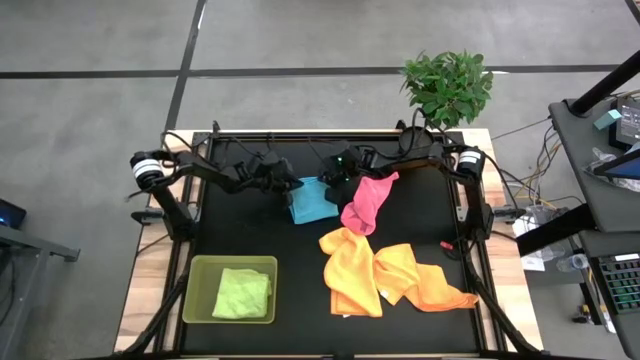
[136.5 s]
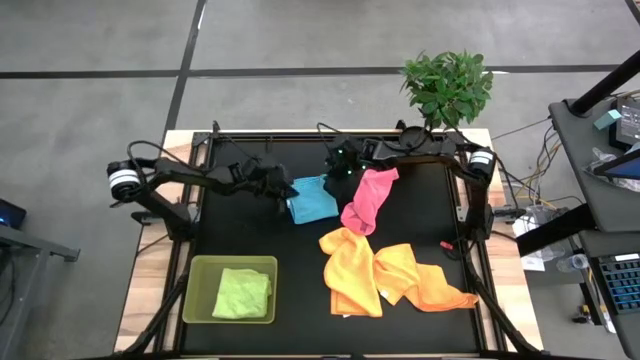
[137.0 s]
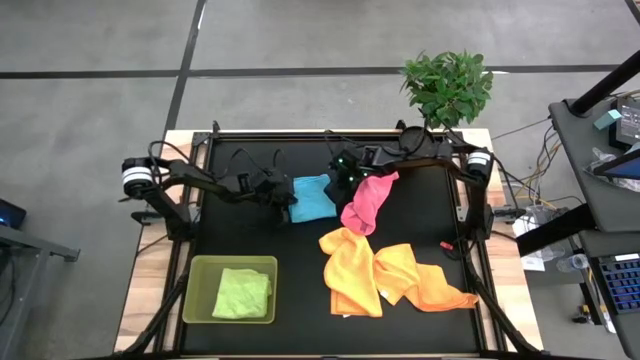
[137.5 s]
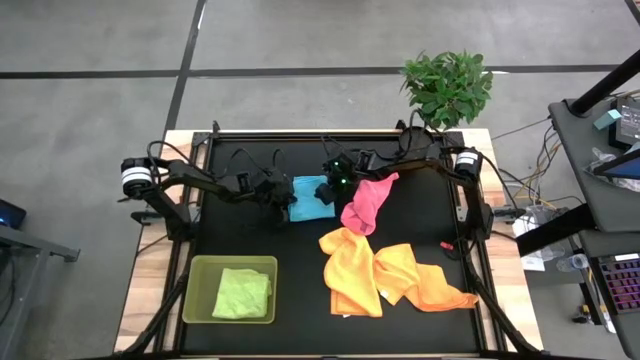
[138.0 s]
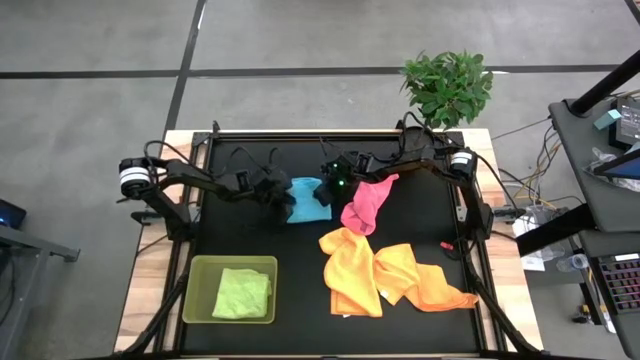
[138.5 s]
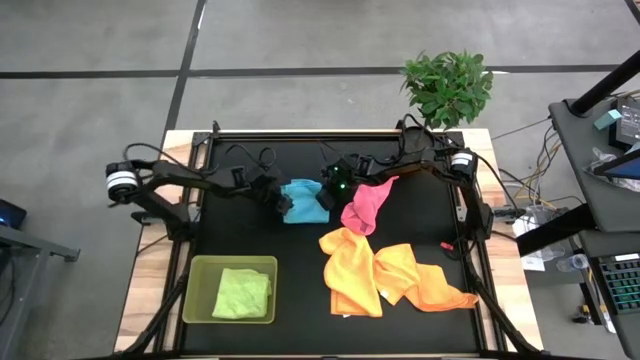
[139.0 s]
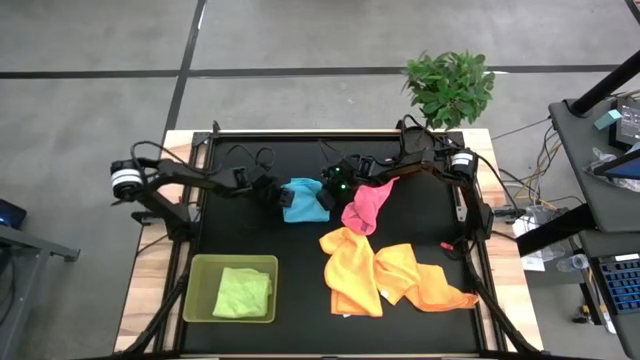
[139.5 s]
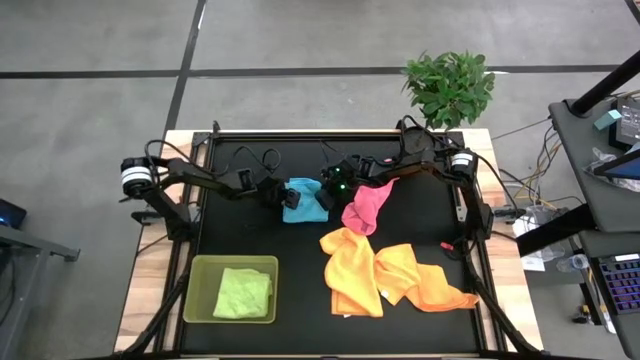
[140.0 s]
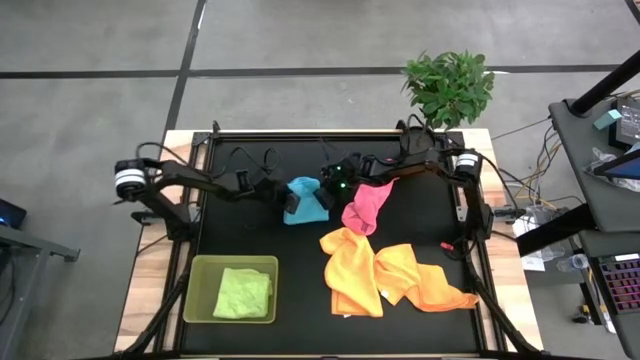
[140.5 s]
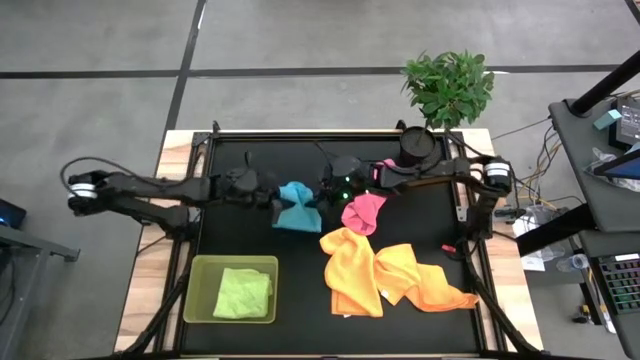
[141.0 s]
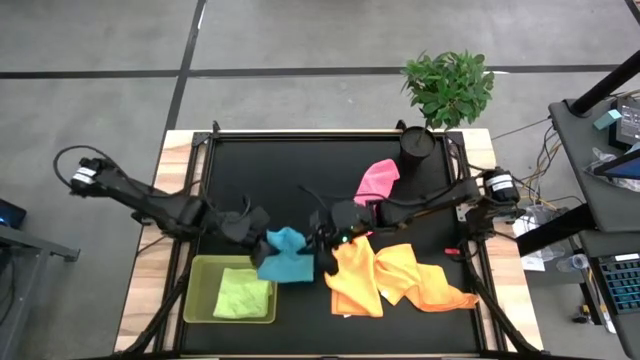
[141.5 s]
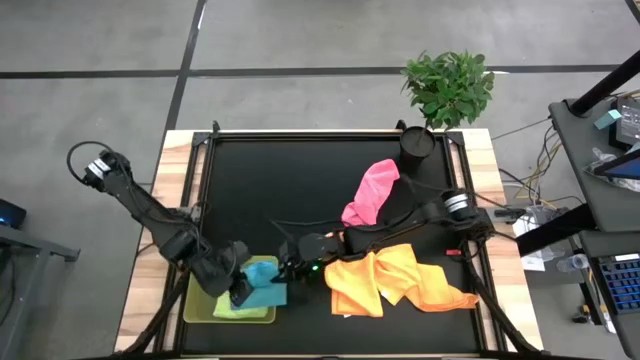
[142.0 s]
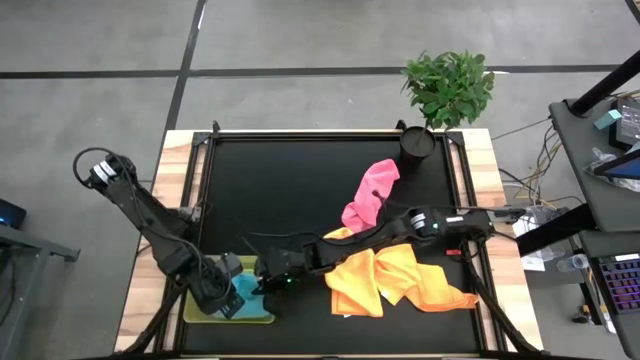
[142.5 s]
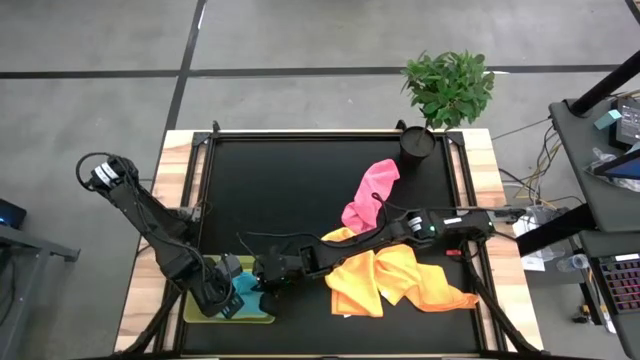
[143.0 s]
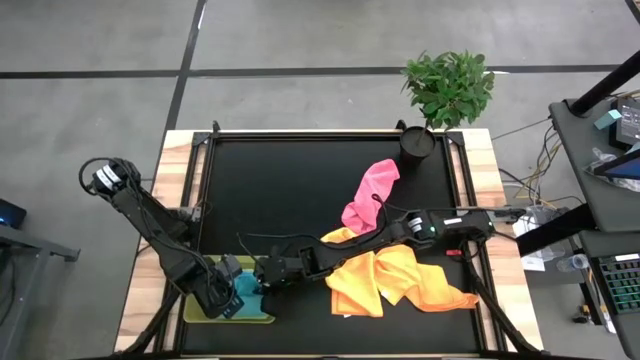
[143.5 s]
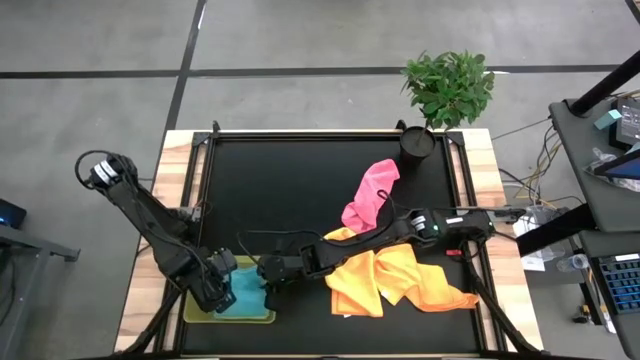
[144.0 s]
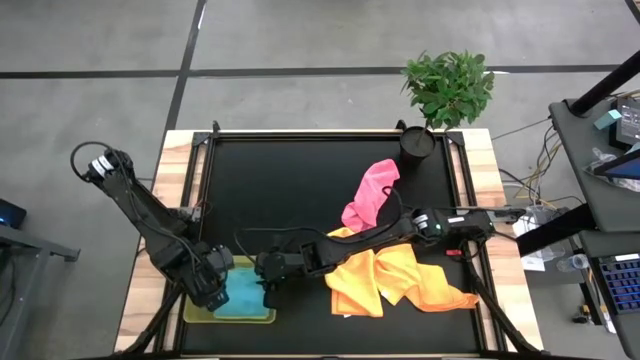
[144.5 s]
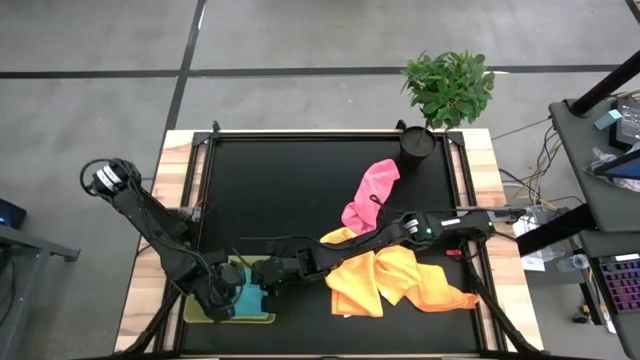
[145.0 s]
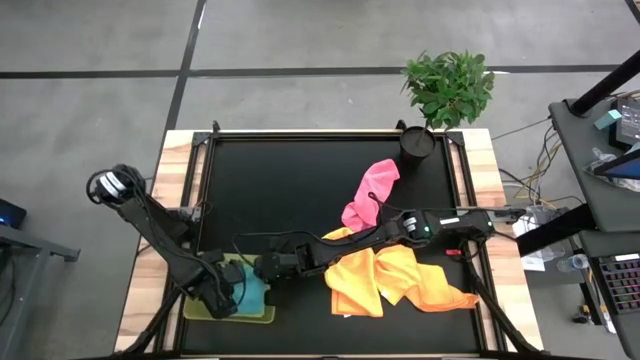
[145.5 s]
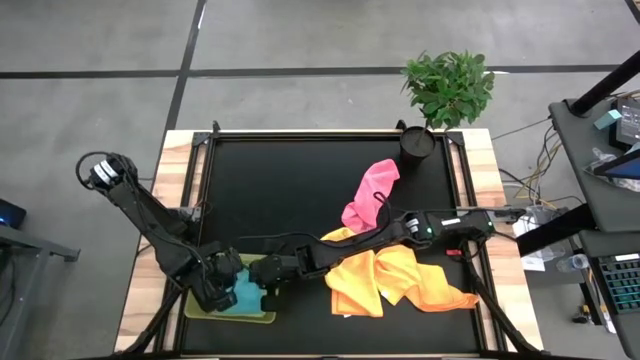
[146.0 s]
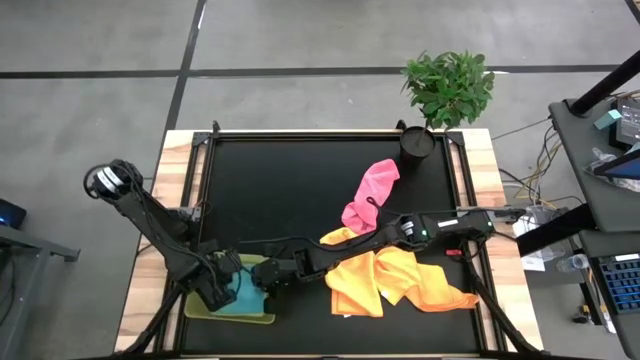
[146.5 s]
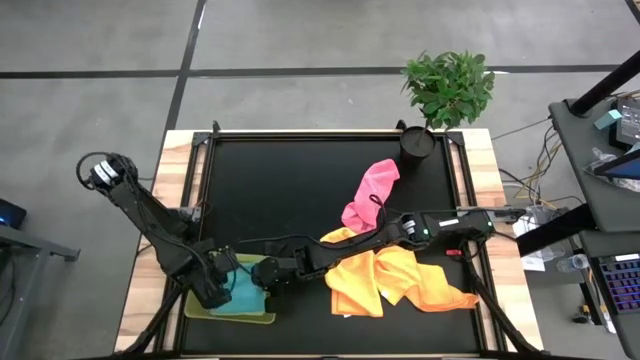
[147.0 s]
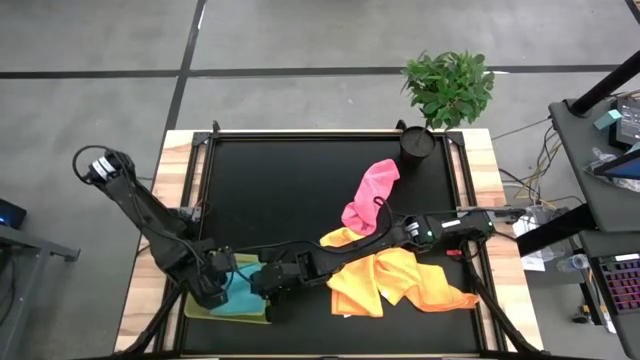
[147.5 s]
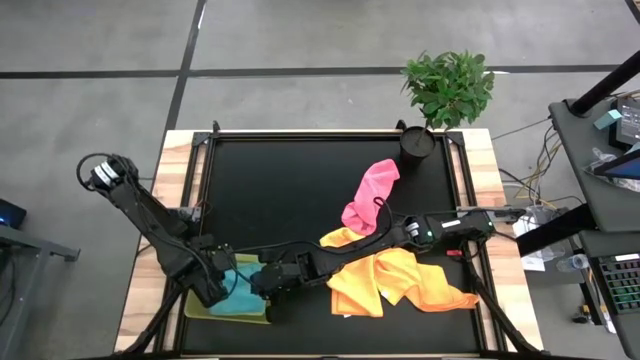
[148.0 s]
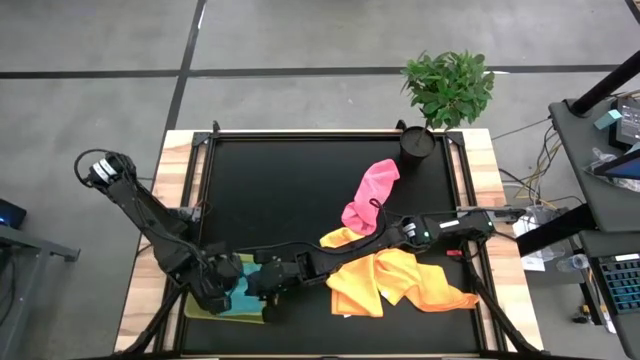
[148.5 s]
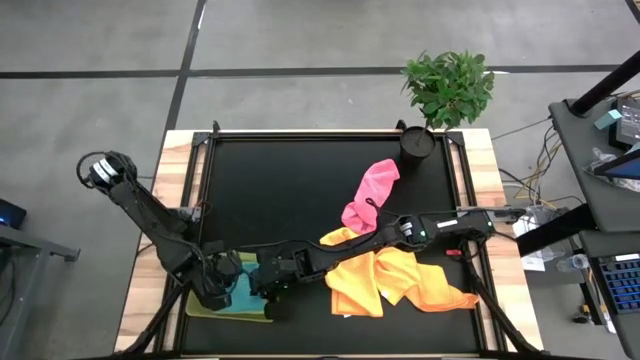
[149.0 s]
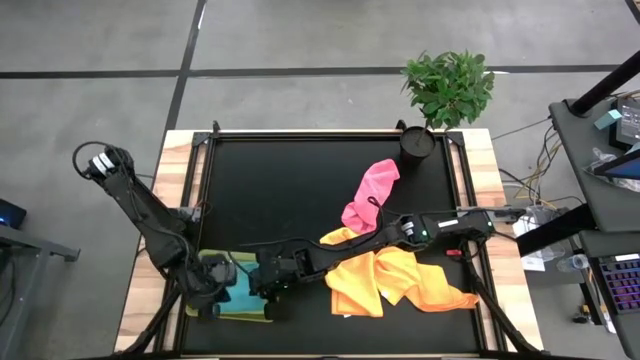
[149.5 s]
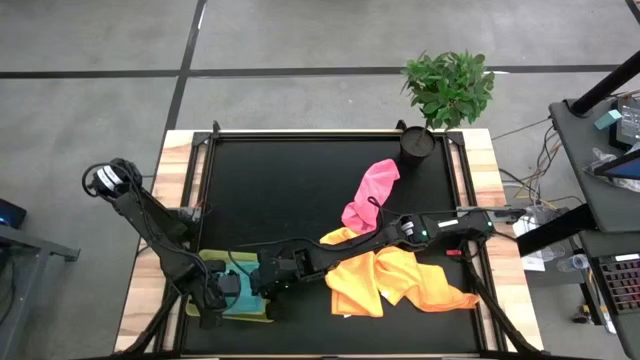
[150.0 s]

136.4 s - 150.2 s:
Task: Fold microfiber towels
Put the folded blue microfiber towel into the yellow bin

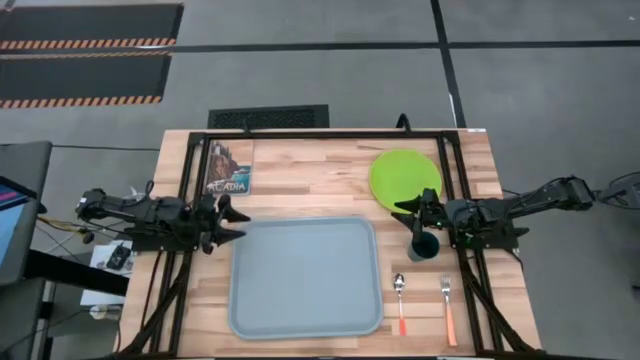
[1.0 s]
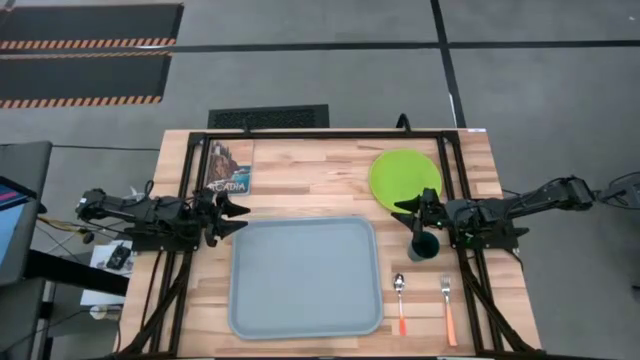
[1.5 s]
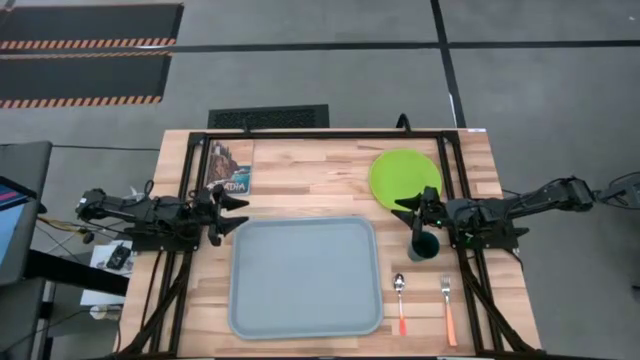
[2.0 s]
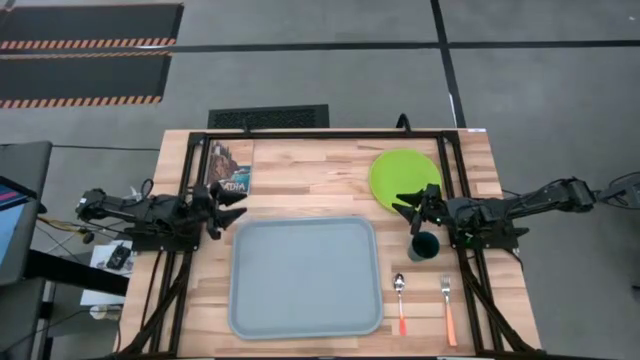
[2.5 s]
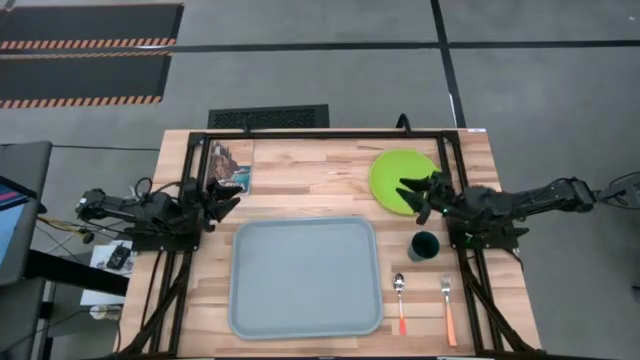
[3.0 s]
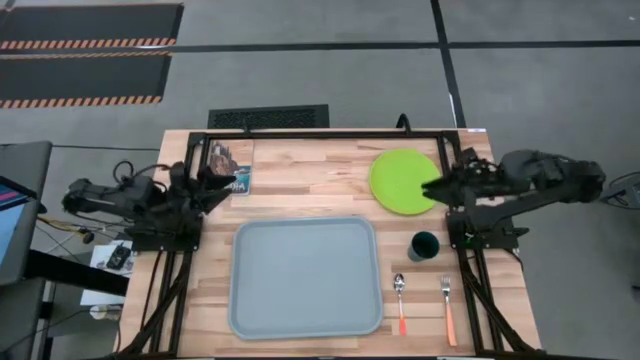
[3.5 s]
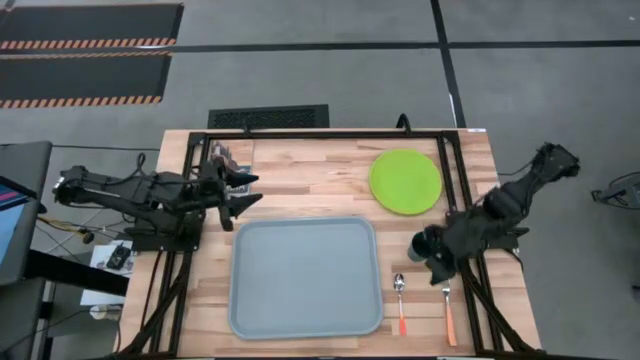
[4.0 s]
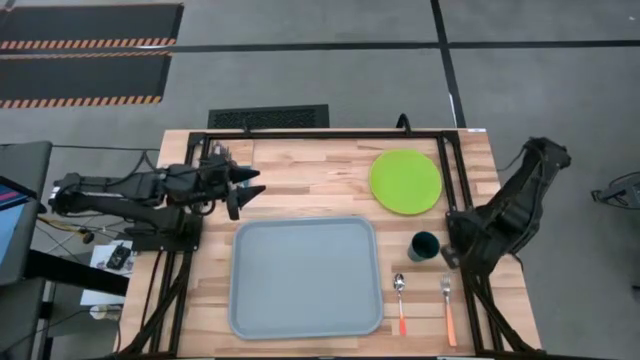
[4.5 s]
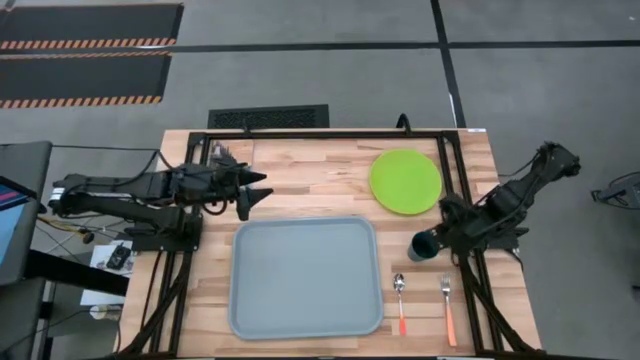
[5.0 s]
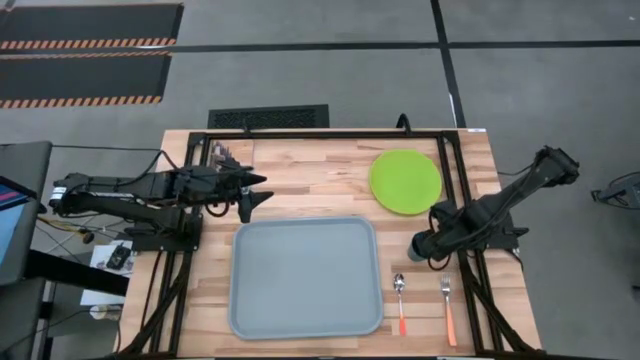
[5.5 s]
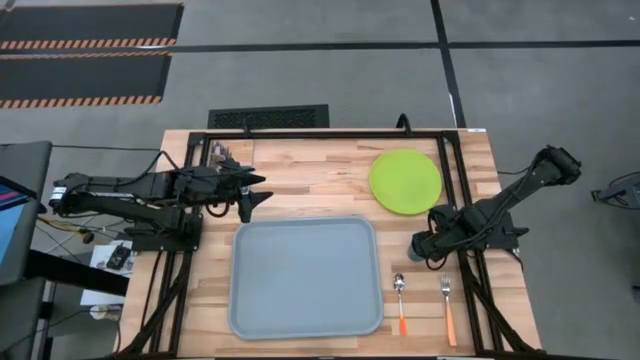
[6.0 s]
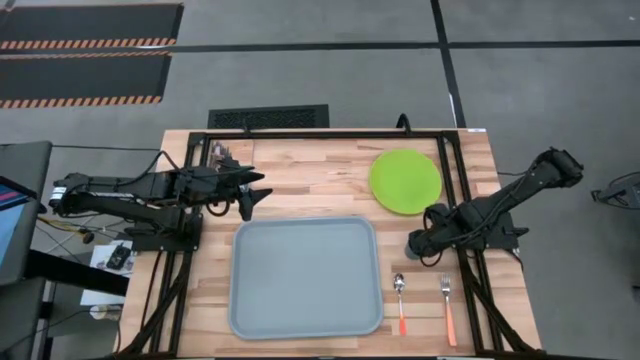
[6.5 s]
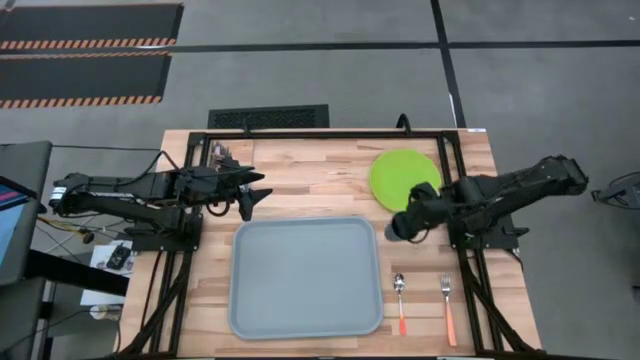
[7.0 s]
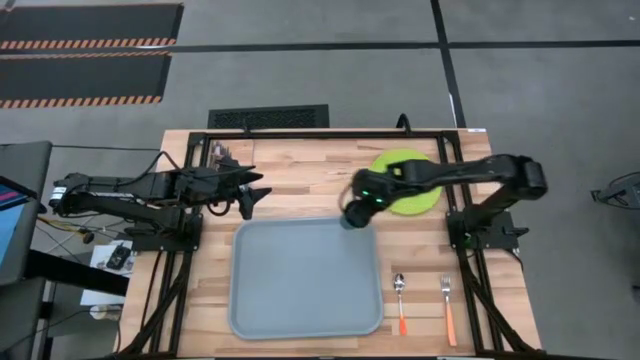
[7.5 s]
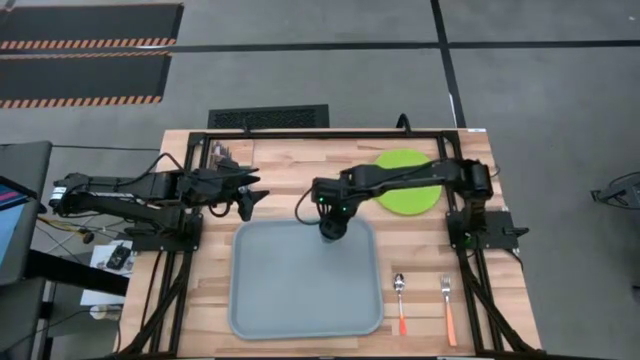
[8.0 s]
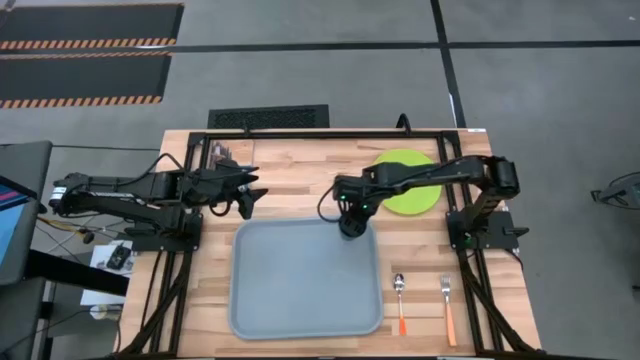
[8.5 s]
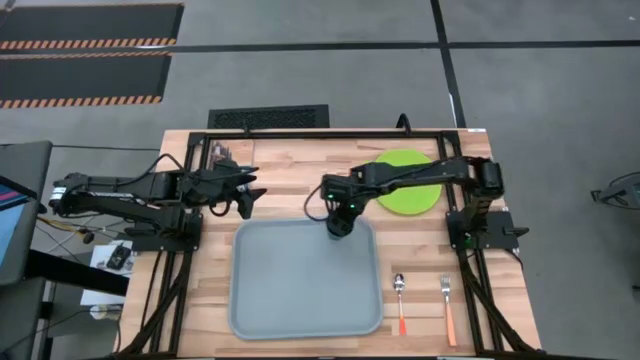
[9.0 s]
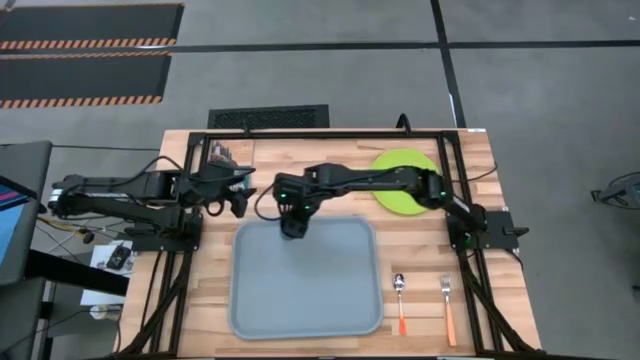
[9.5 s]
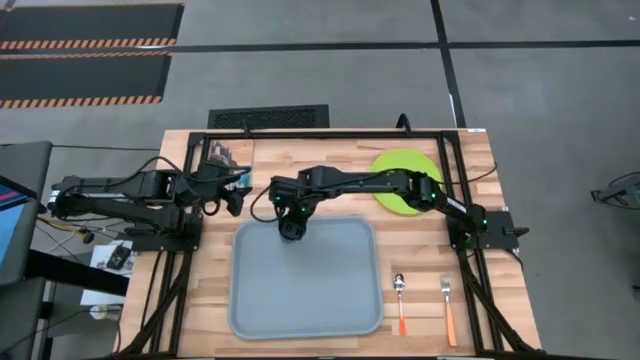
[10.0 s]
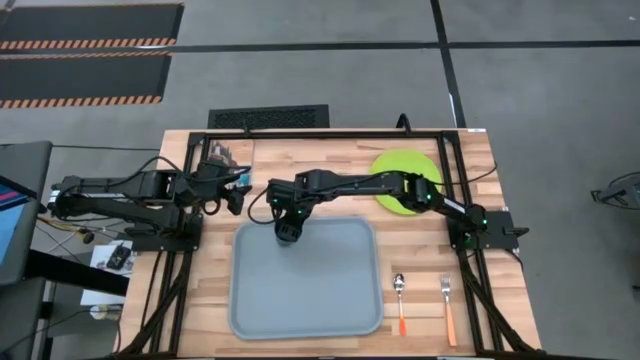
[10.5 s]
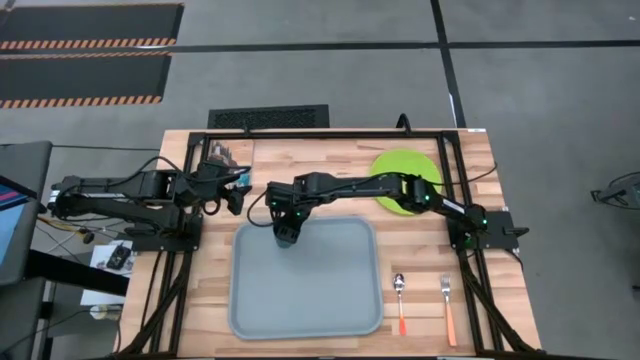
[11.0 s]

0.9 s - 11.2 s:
Task: Pick and place plate/cup/fork/spoon on tray
Put the dark green cup on the gray serving tray
